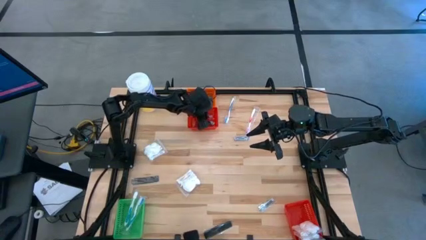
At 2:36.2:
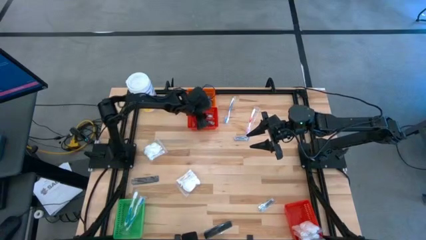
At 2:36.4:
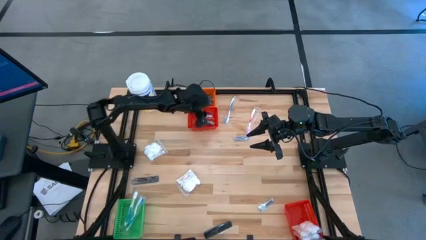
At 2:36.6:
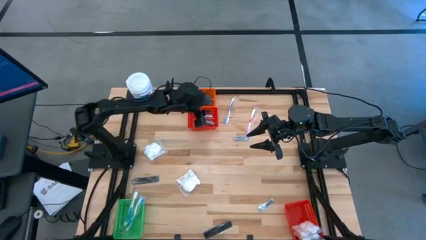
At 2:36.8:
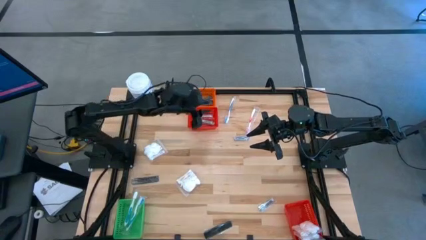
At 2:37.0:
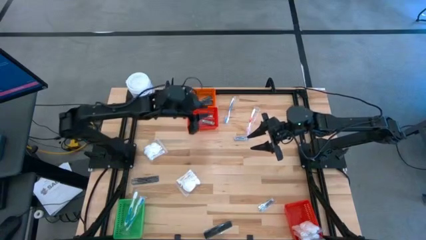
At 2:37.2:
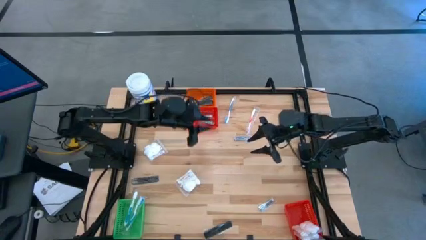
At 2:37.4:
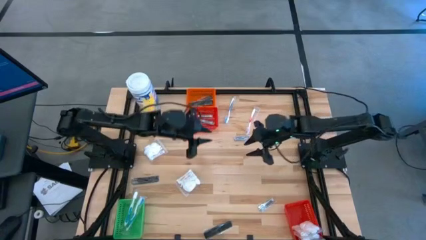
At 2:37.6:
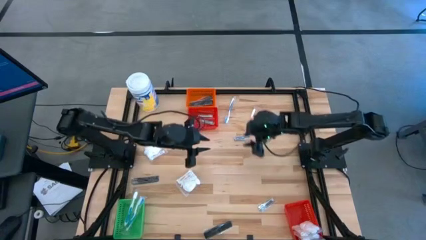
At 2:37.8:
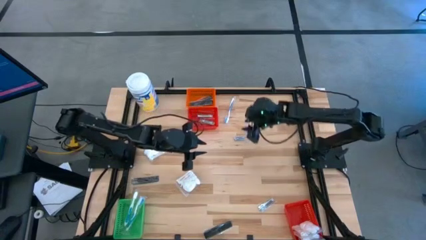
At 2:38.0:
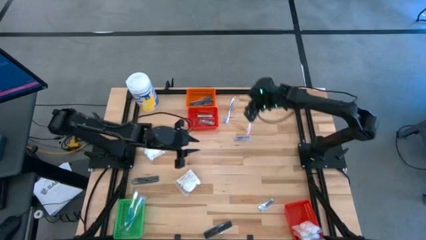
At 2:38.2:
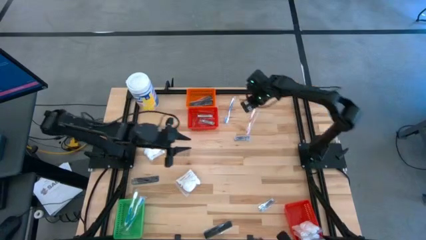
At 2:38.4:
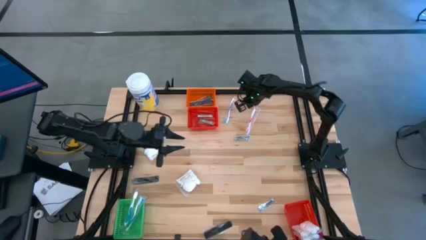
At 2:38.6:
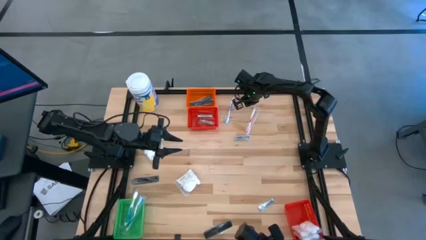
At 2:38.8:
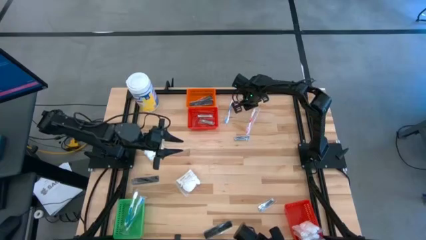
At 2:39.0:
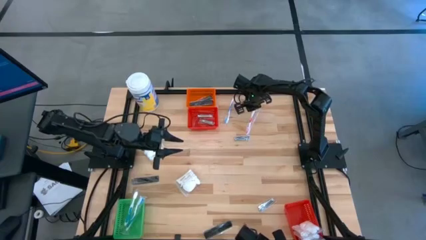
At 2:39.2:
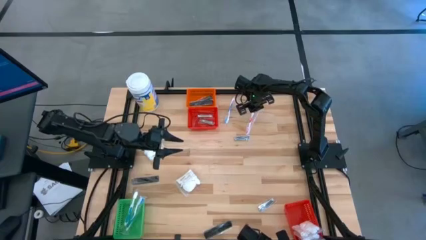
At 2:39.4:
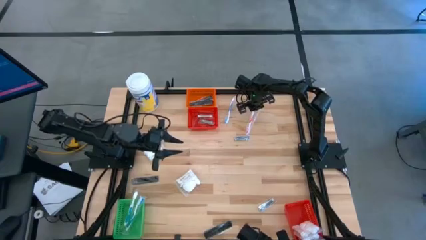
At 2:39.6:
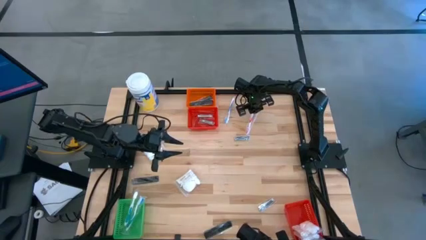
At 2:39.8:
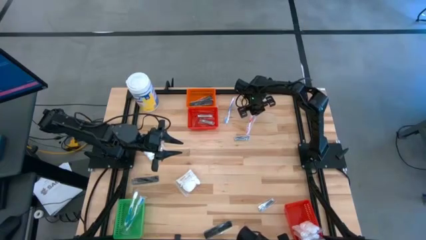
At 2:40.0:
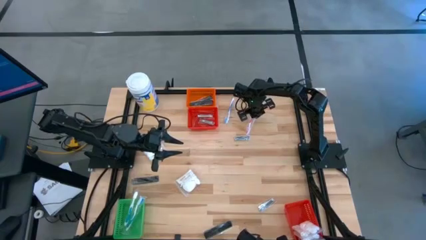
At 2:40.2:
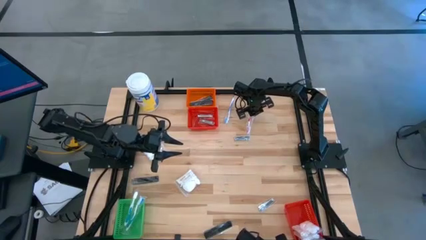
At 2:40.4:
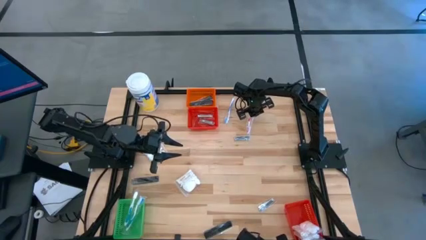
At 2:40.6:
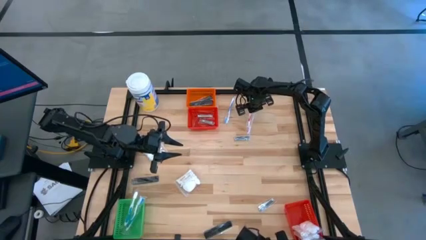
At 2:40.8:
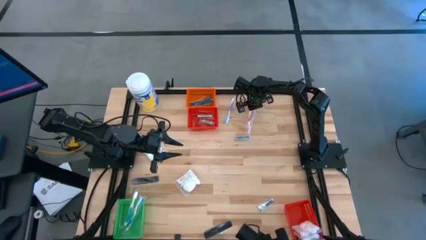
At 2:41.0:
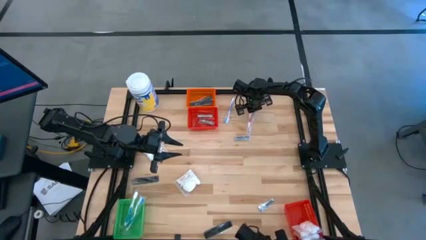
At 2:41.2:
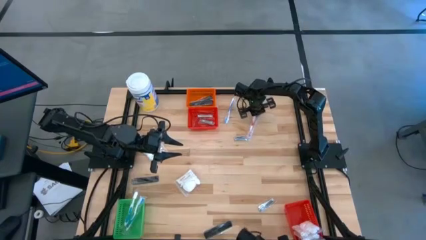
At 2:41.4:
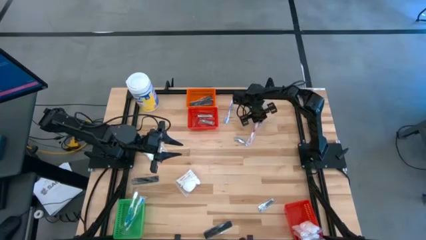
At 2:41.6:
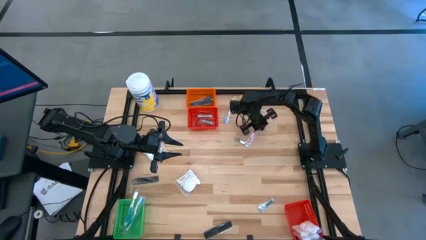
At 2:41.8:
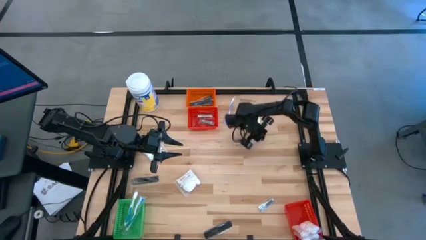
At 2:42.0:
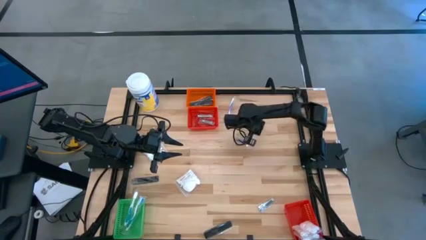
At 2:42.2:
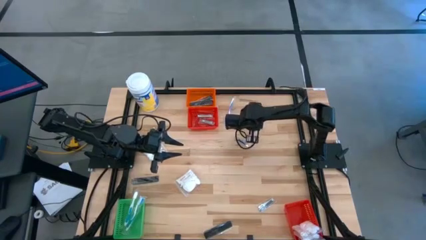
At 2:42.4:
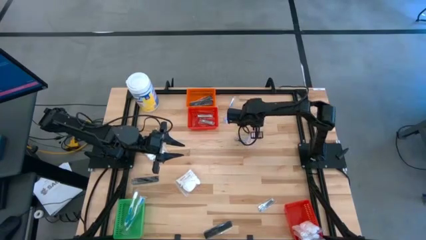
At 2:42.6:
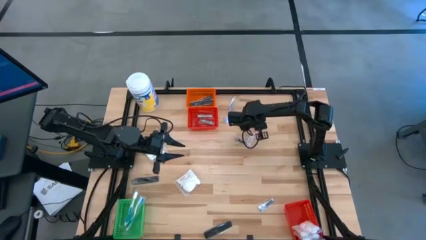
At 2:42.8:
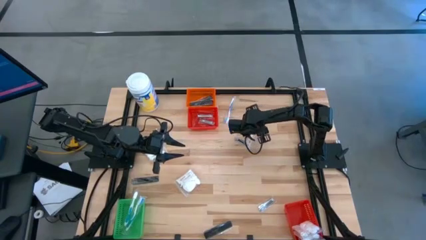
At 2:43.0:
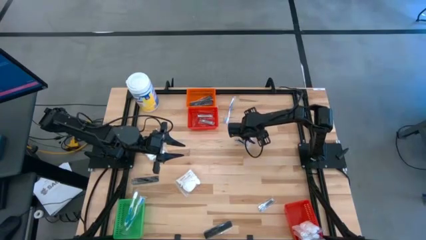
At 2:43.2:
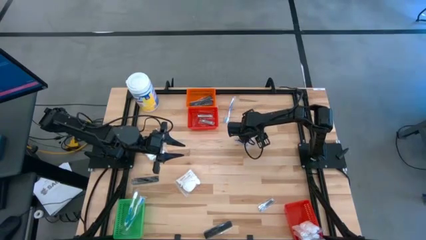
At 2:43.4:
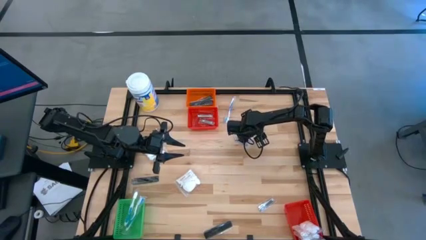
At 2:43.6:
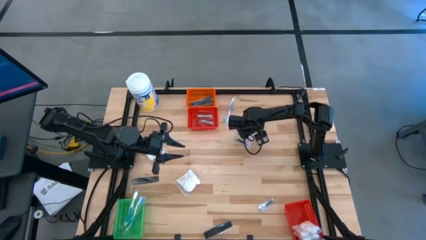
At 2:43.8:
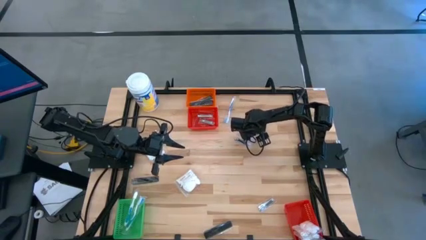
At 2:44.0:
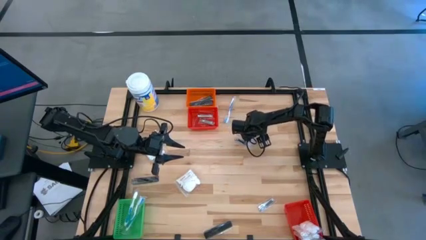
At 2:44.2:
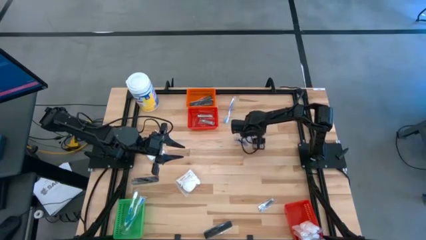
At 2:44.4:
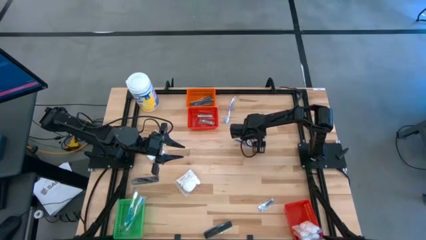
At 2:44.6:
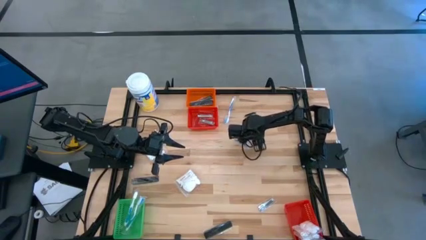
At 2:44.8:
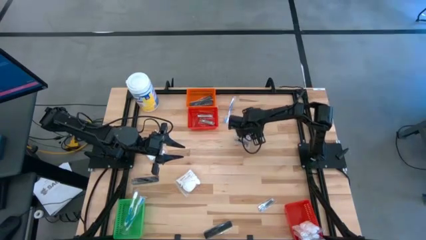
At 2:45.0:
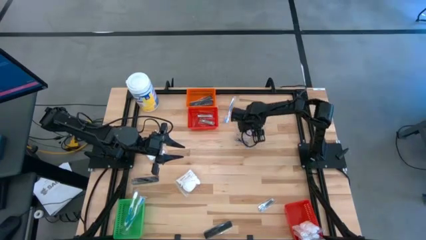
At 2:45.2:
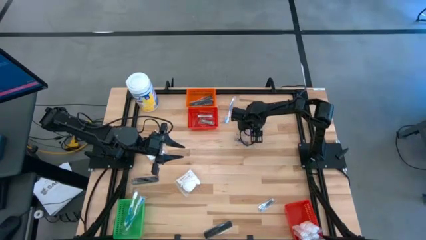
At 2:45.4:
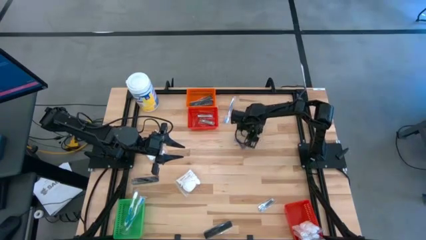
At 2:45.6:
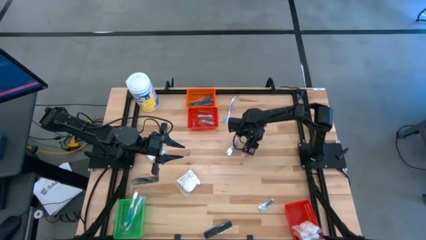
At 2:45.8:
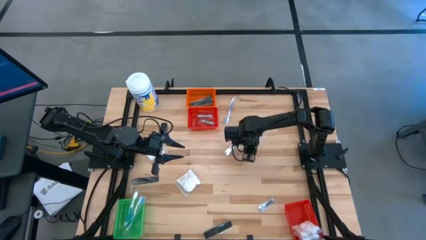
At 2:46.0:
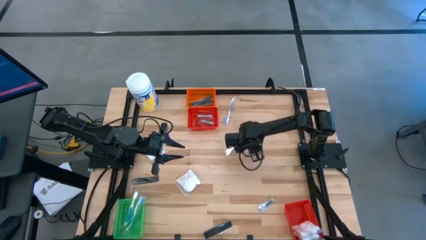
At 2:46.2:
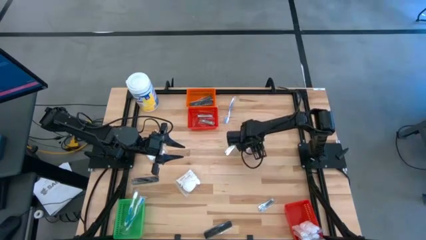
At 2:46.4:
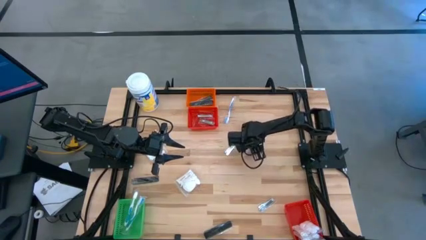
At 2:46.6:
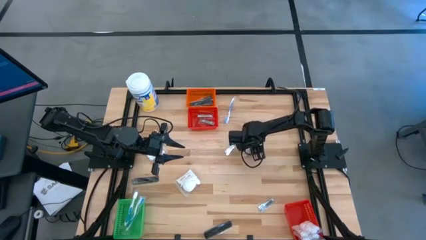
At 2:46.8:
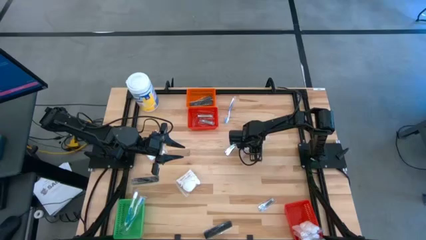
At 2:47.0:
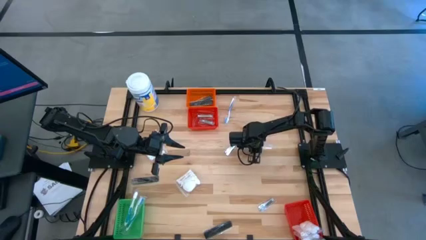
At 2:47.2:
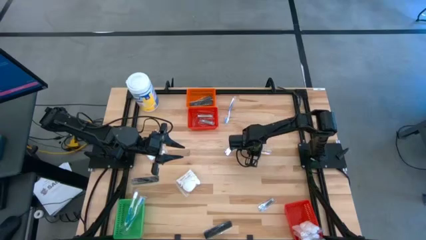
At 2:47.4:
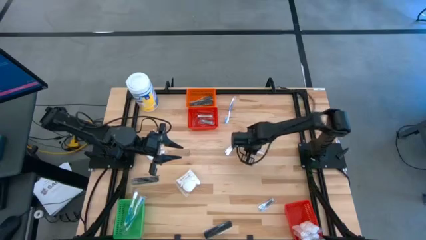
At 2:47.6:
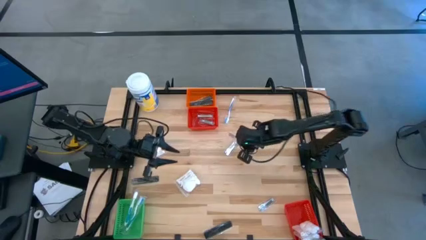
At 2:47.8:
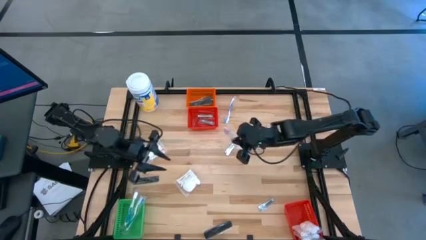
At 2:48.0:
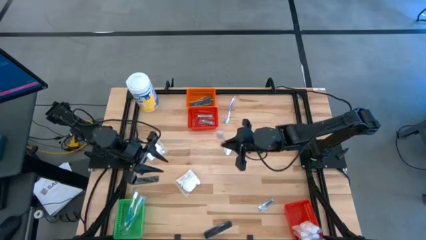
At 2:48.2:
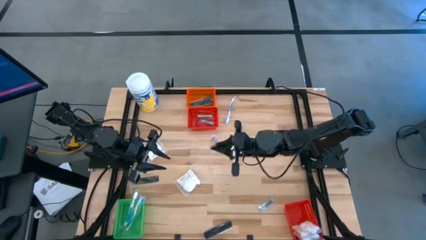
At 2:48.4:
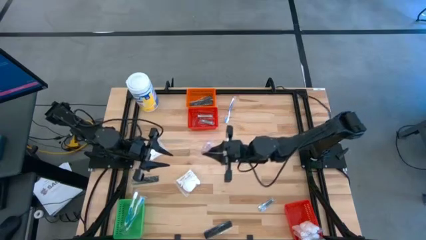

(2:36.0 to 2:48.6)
Task: Pick & Place Travel size toiletries
Put the red toothbrush into the green basket

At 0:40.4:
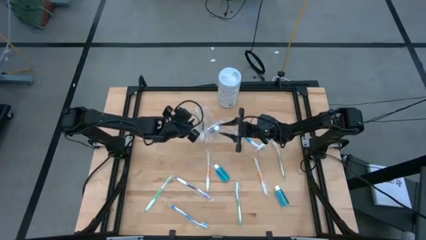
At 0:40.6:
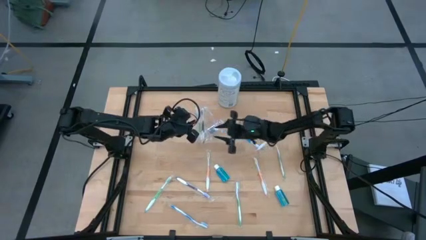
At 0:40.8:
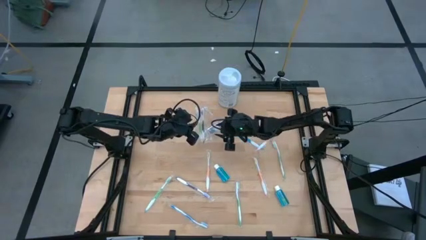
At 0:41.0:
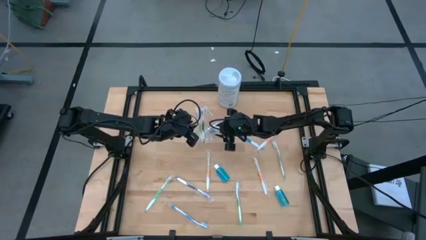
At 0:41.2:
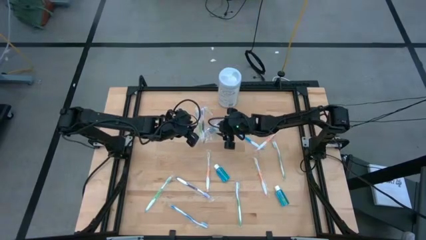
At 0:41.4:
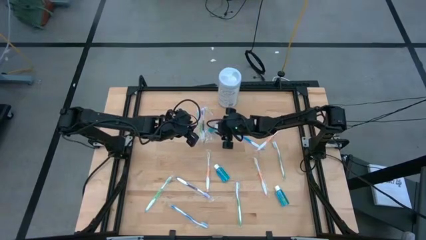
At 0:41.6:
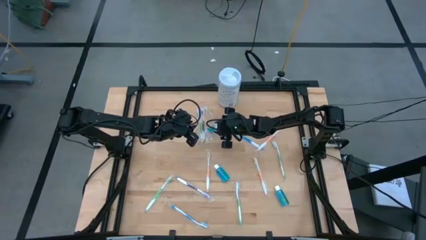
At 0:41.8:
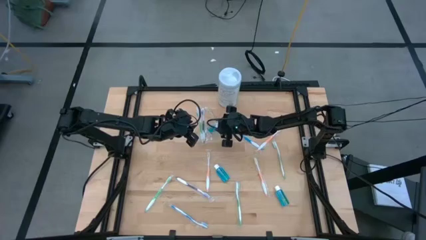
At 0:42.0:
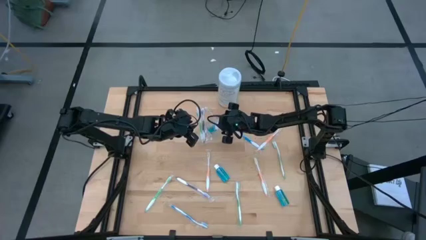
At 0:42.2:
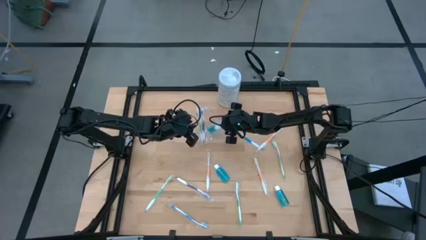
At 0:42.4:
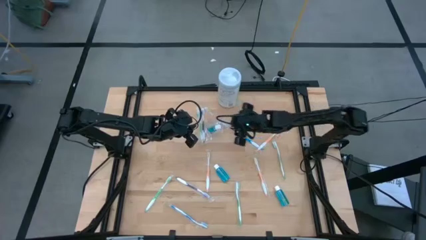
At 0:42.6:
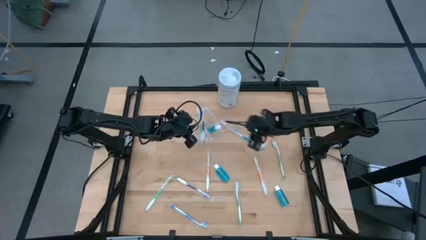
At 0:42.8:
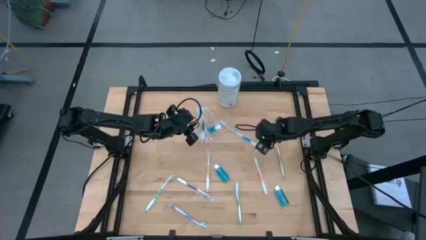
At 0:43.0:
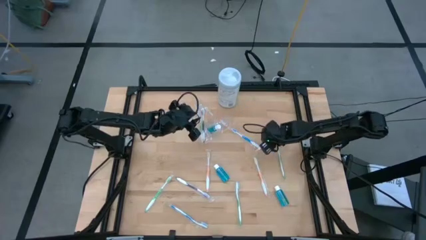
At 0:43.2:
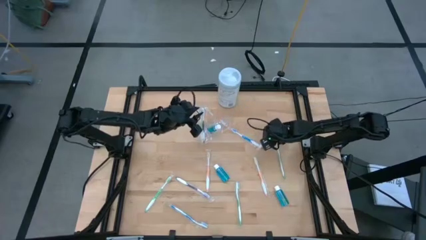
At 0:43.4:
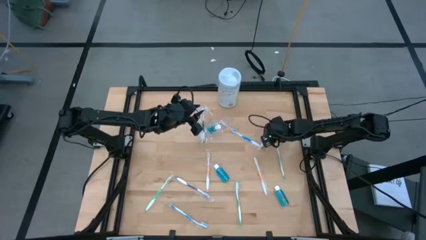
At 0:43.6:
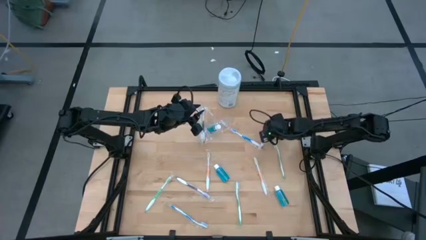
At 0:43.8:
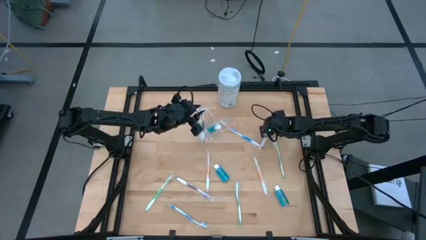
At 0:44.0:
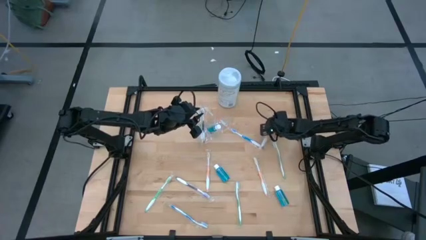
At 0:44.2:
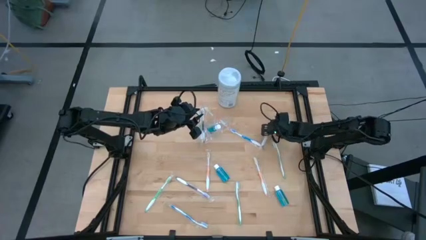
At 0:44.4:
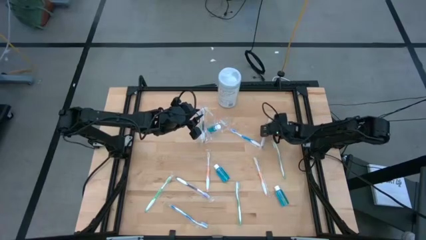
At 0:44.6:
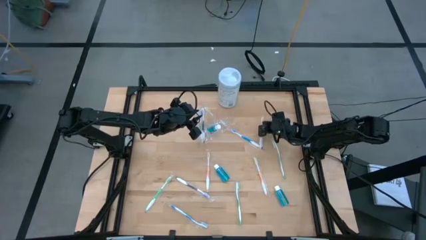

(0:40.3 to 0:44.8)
Task: Pick & Place toothbrushing station
Put the orange toothbrush into the transparent organizer
